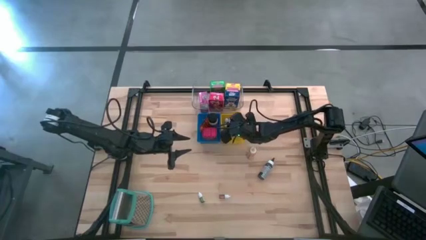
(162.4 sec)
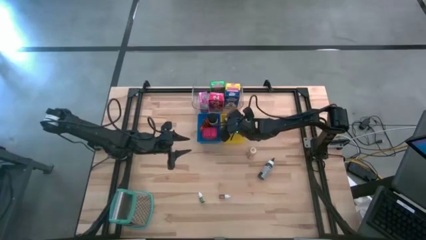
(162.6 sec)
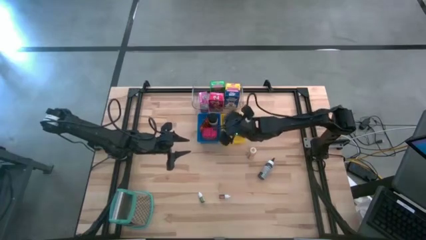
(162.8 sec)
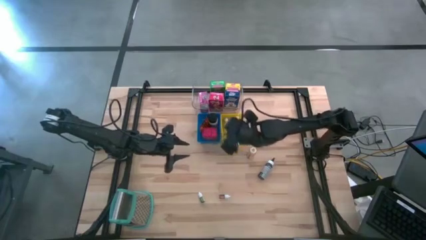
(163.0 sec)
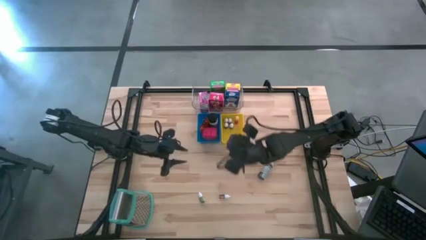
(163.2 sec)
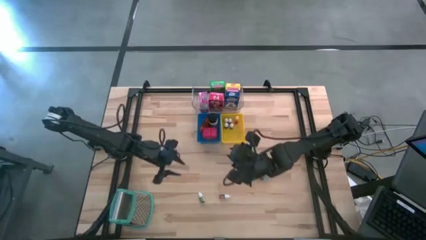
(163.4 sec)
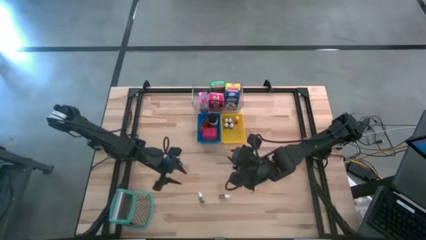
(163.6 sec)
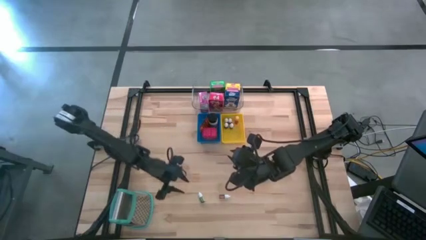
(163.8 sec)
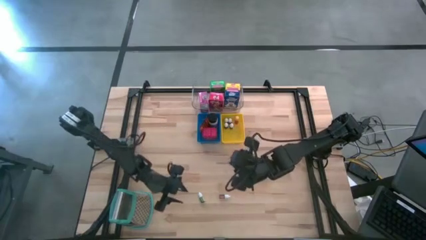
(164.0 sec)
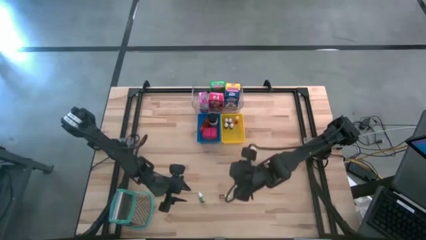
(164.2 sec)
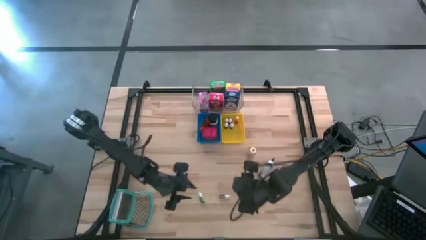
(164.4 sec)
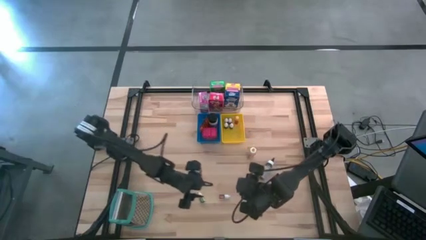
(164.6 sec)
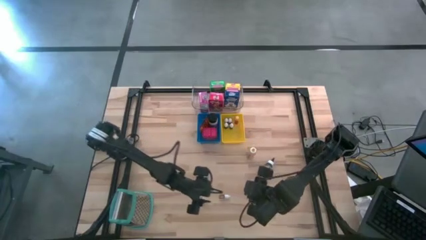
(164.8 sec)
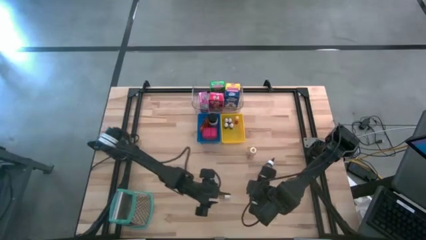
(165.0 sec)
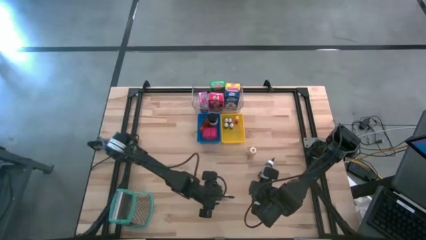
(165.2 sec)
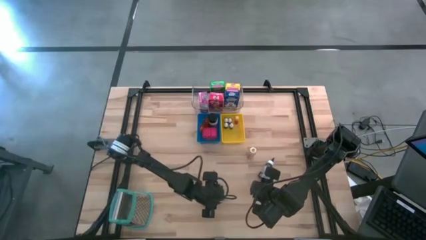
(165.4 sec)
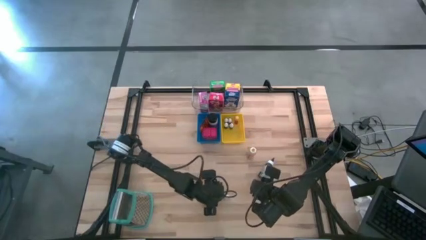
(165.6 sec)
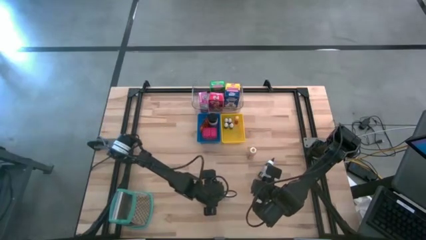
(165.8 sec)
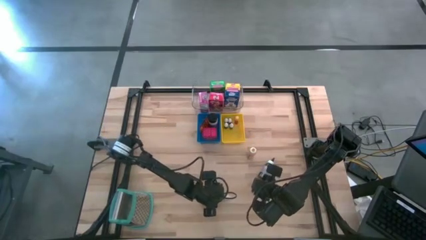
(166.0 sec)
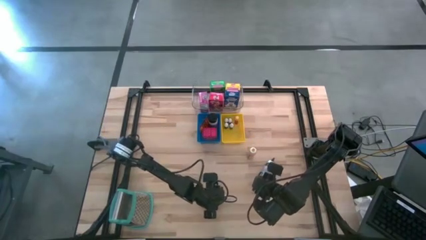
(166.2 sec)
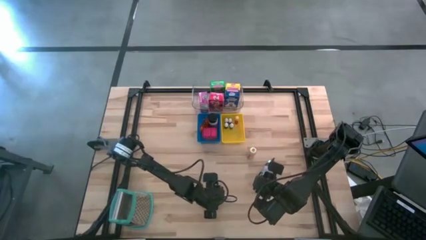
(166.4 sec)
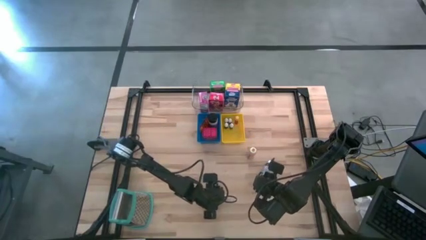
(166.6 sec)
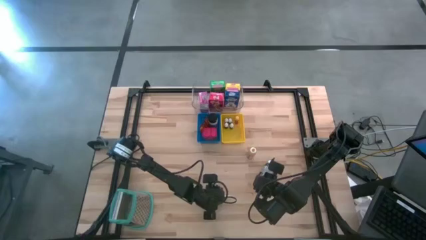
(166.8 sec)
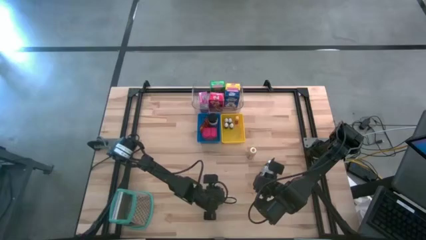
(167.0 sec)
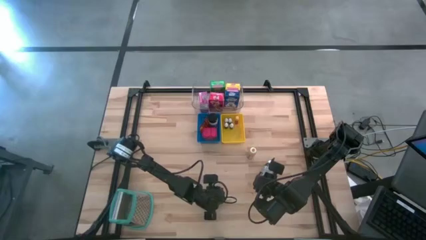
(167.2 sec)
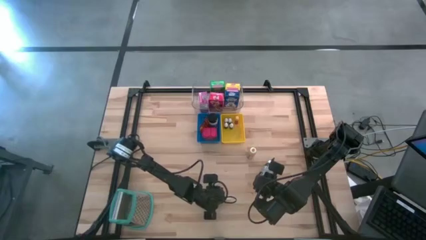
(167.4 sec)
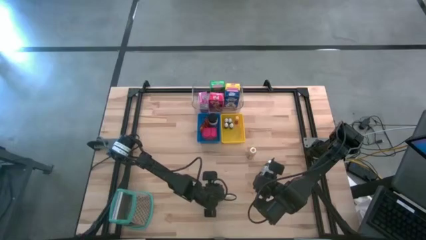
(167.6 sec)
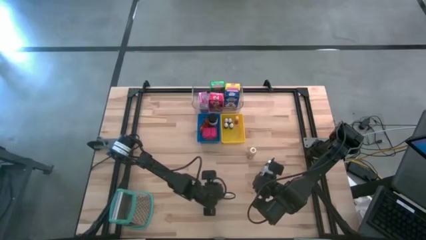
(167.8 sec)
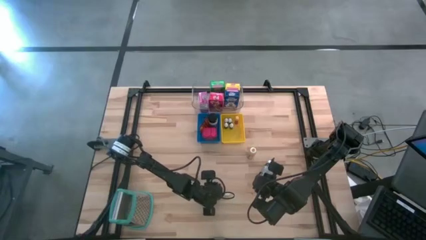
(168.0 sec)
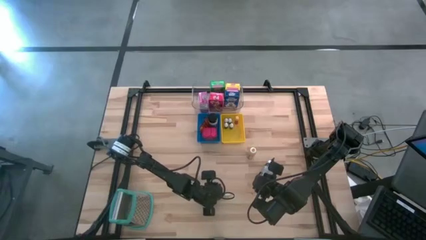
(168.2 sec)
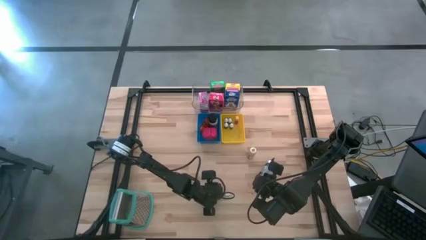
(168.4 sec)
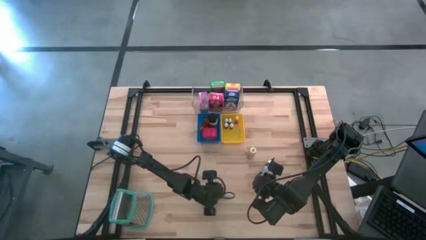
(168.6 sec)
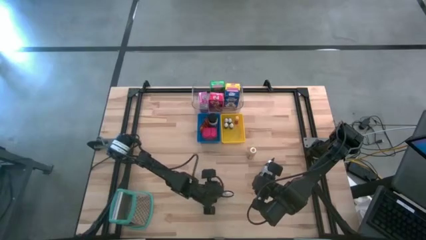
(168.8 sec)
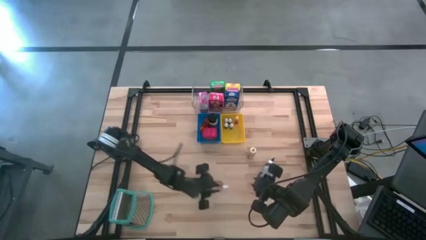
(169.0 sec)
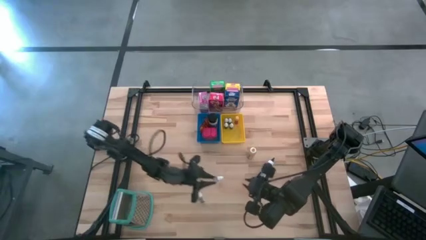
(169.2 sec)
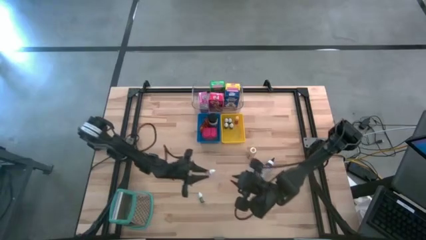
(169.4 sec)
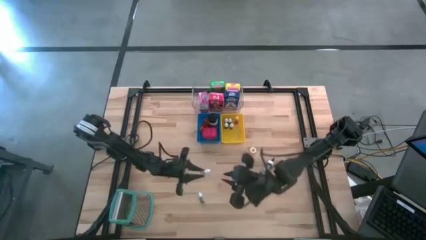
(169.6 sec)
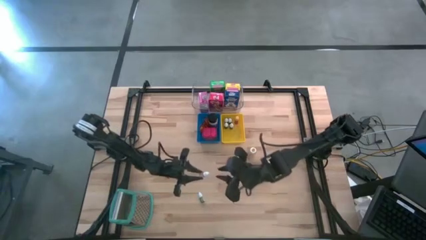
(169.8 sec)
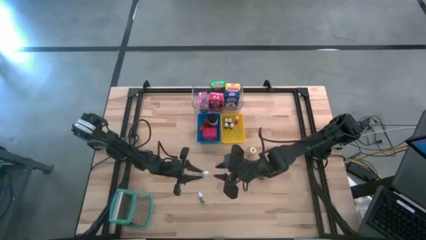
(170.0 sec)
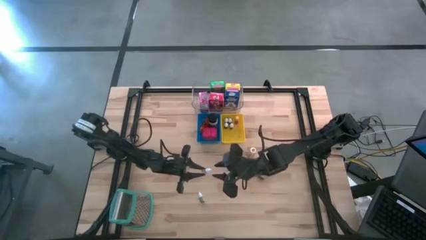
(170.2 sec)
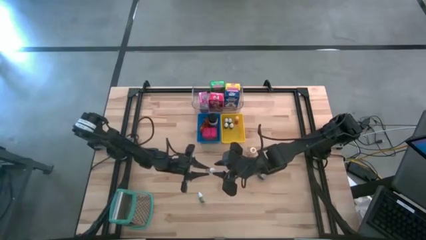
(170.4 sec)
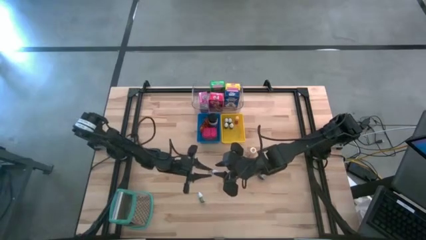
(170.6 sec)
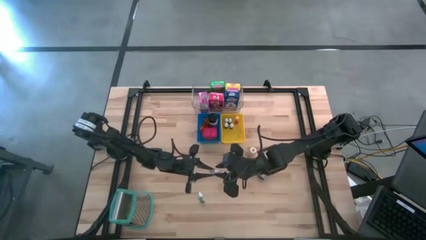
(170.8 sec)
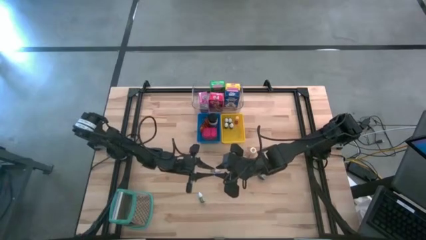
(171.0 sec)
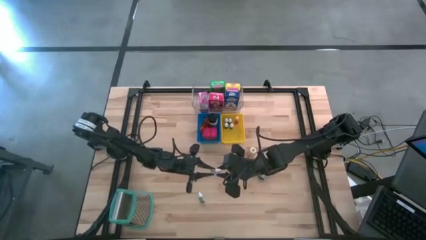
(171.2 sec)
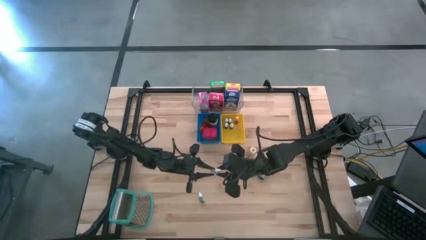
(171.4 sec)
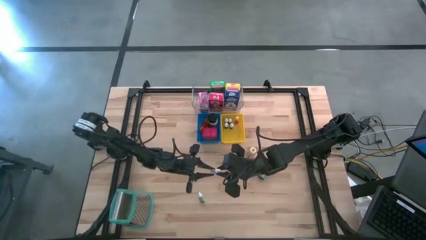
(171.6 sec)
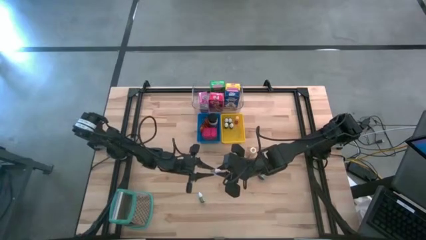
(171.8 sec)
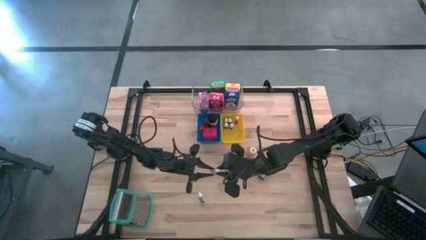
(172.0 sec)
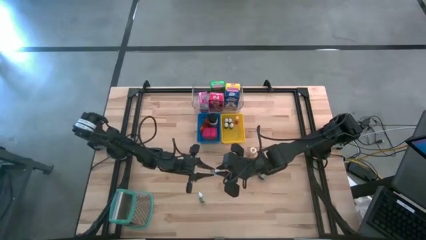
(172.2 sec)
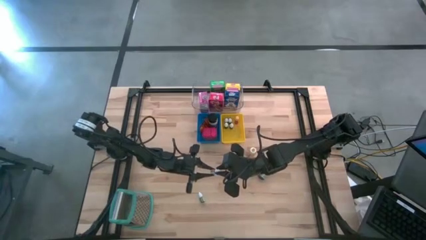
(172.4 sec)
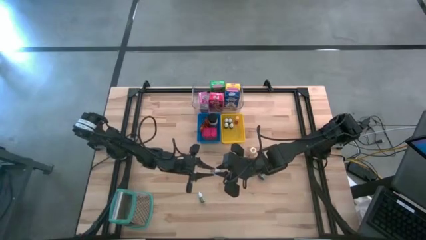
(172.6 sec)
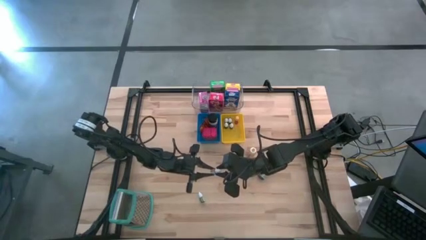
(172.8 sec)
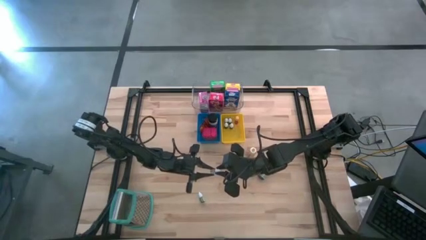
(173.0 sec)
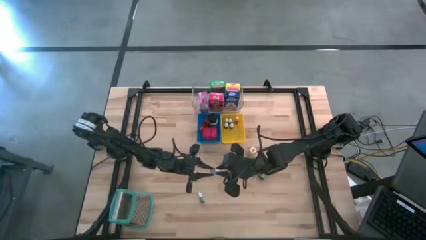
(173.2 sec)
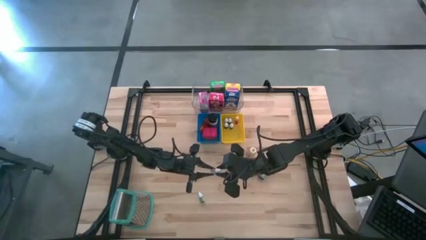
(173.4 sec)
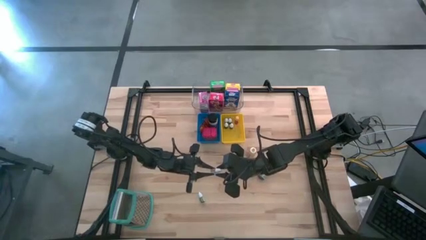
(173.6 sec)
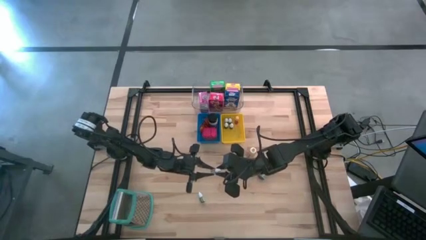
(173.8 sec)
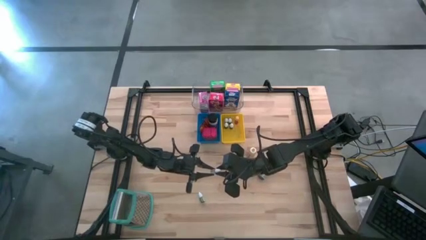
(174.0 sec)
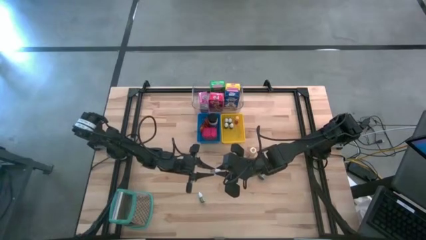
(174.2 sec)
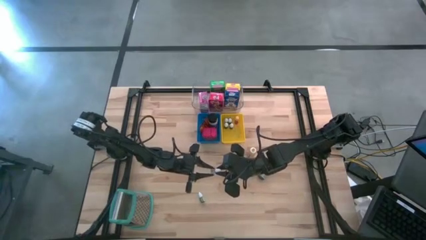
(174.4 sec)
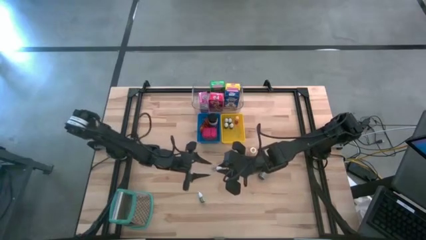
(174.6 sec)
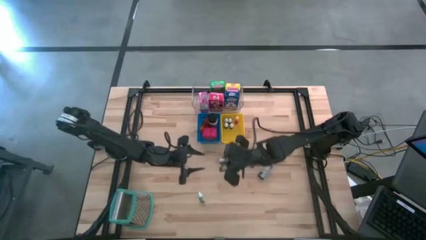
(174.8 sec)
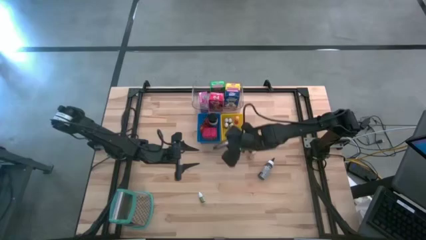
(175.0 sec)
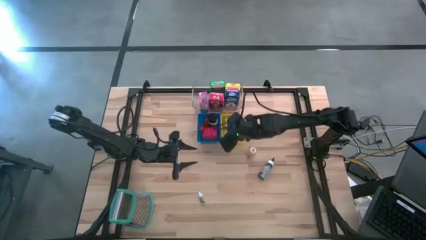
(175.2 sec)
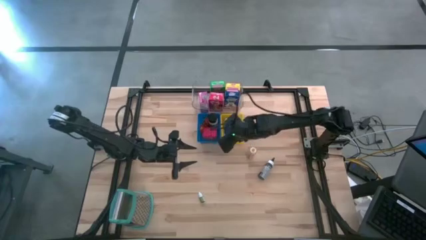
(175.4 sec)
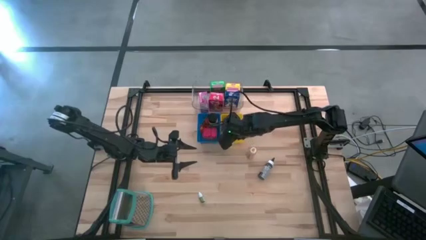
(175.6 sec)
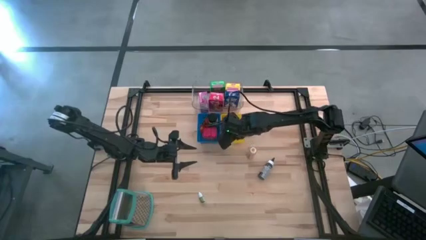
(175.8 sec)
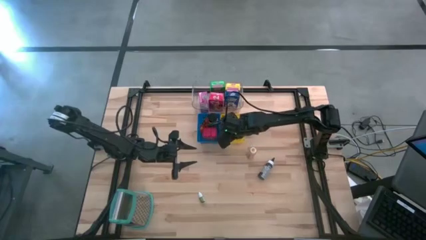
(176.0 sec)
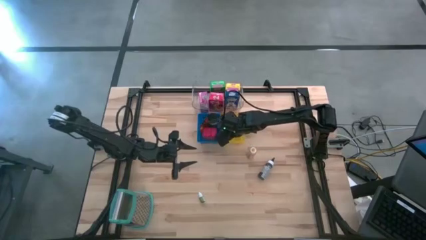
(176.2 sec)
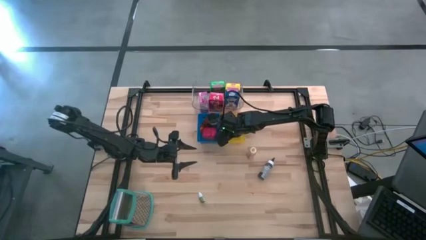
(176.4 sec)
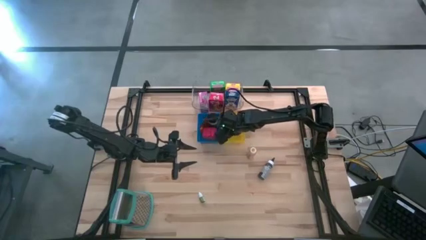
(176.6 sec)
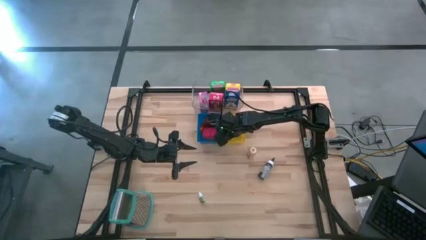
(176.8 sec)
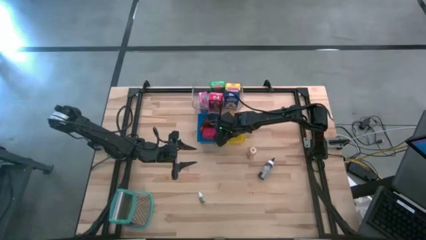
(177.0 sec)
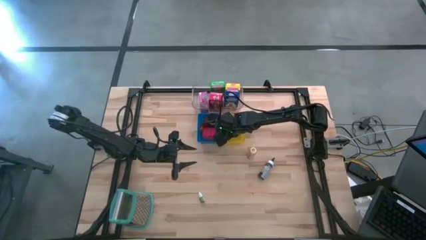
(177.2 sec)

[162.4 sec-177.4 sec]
Task: Pick & Place Kitchen Items
Put the small orange food coloring bottle into the yellow bin

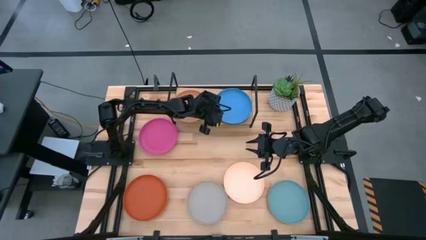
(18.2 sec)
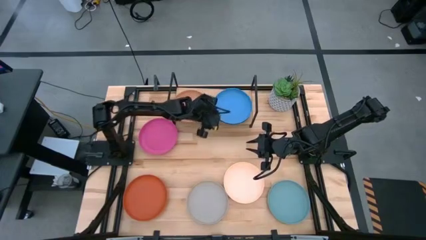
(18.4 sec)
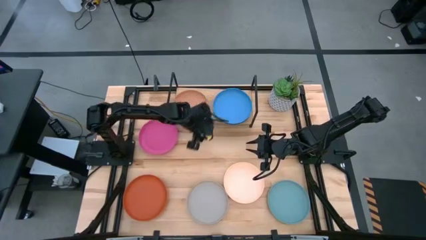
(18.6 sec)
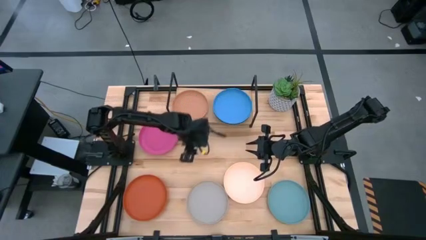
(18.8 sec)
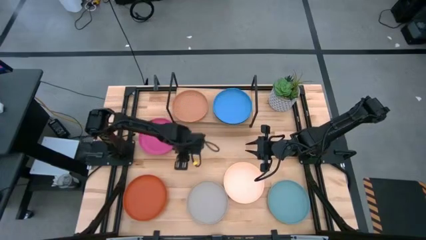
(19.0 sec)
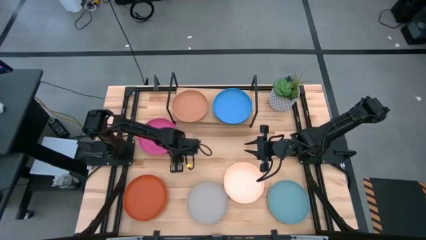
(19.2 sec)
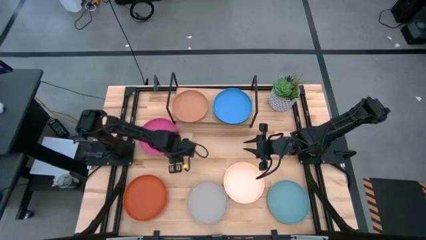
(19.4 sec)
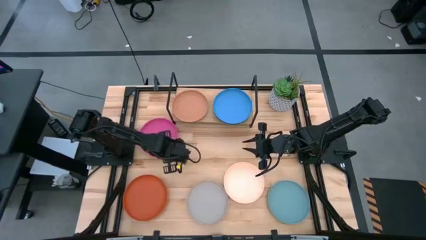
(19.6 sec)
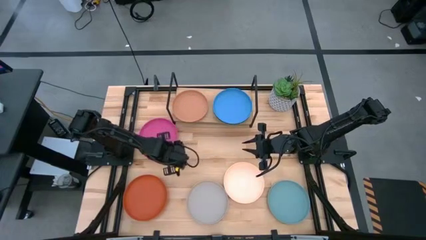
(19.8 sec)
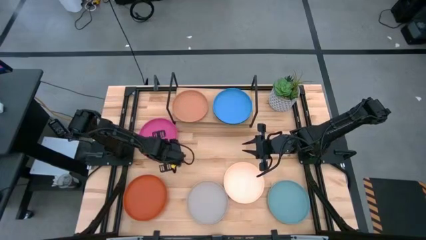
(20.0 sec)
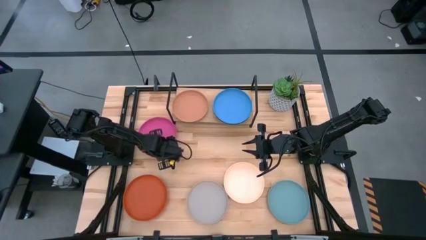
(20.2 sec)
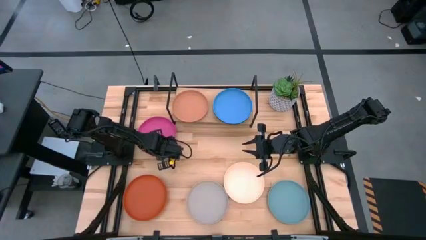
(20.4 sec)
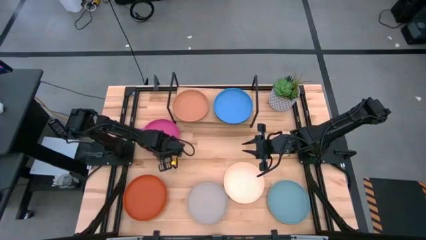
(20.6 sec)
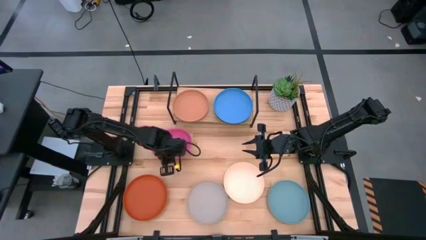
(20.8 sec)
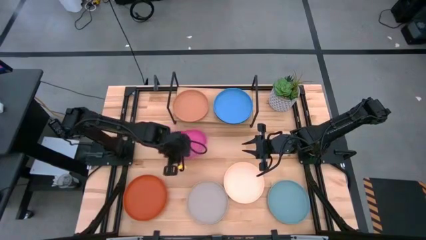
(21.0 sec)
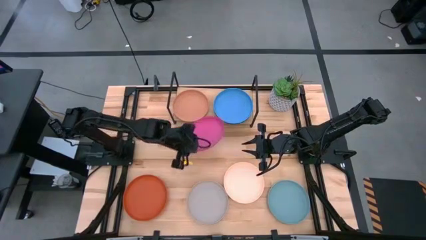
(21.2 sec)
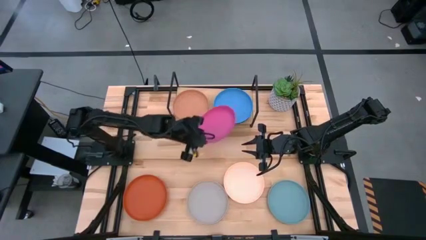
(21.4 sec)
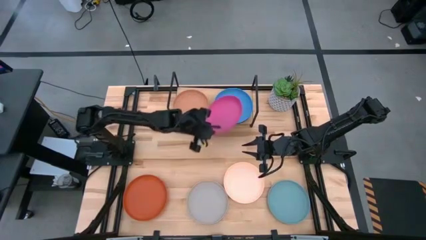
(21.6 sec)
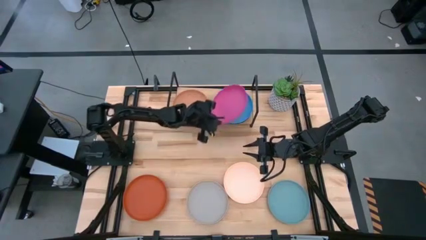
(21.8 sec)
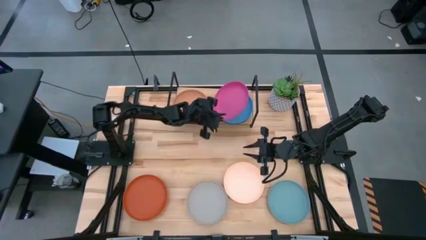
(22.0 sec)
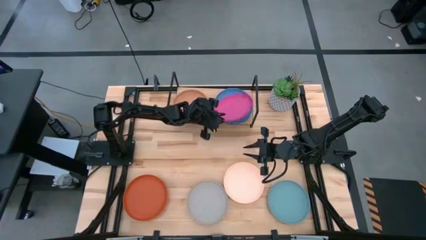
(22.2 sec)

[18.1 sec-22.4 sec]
Task: Place and stack plates onto a shelf
Stack the pink plate on top of the blue plate on the shelf
